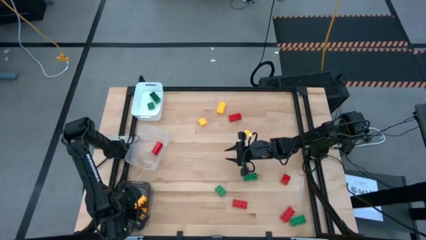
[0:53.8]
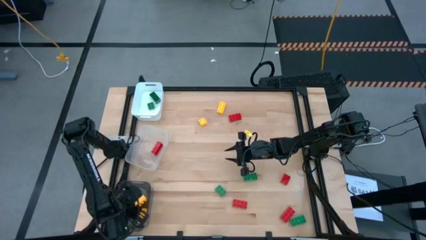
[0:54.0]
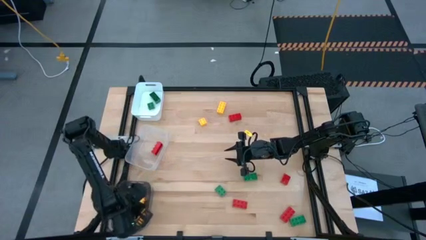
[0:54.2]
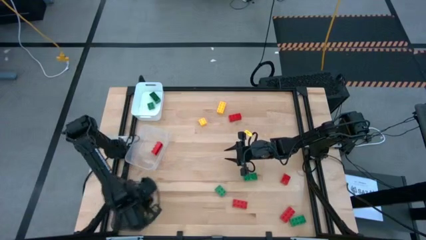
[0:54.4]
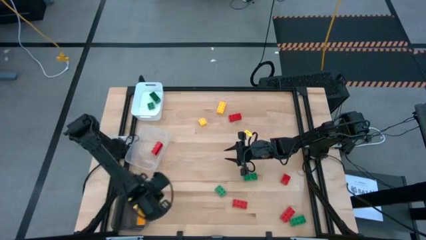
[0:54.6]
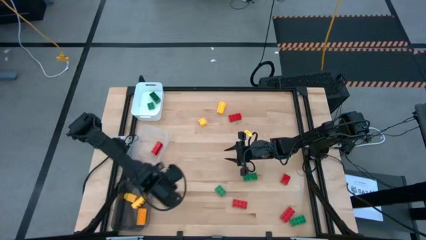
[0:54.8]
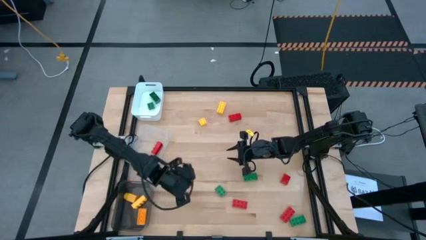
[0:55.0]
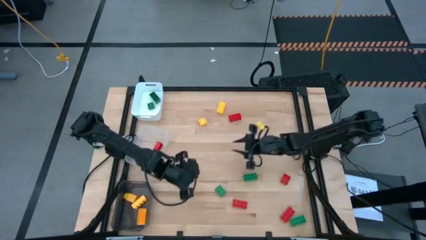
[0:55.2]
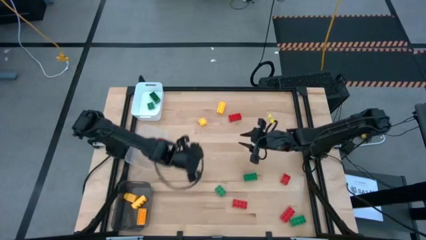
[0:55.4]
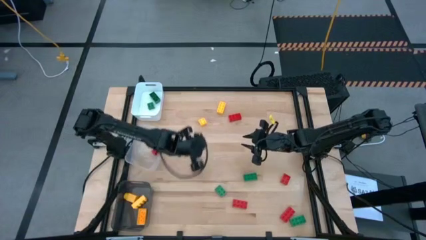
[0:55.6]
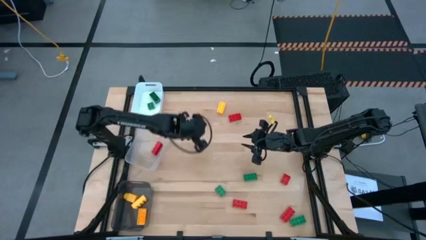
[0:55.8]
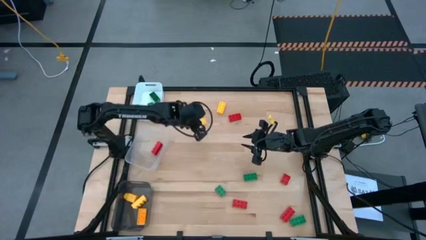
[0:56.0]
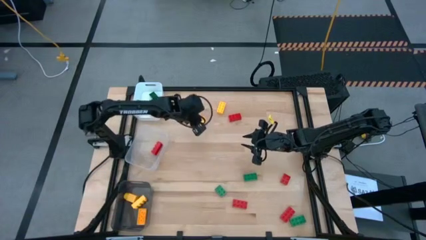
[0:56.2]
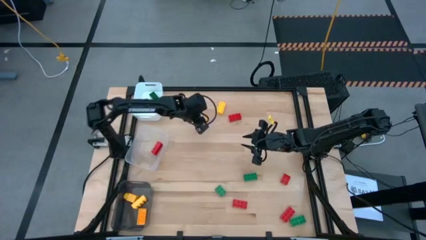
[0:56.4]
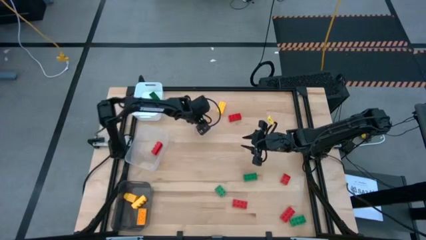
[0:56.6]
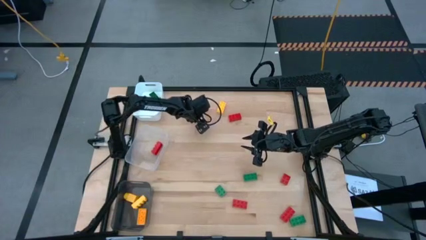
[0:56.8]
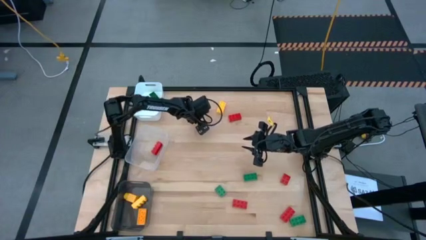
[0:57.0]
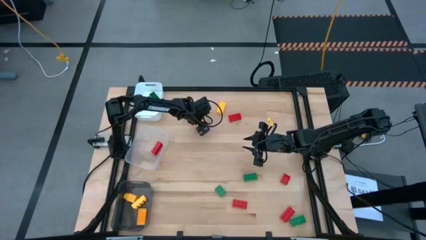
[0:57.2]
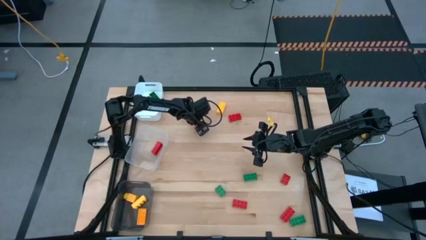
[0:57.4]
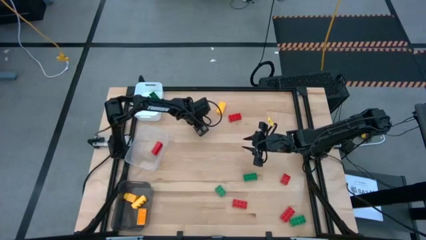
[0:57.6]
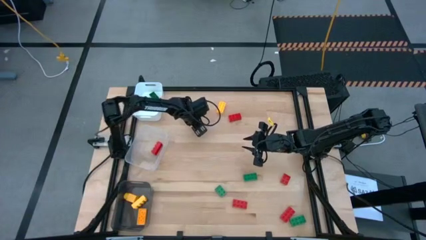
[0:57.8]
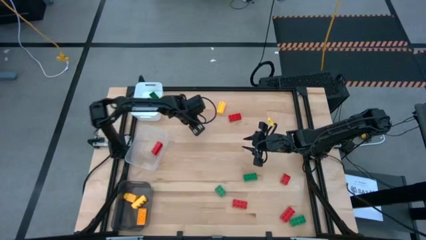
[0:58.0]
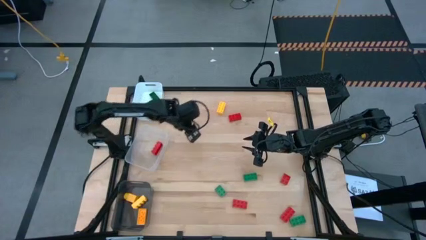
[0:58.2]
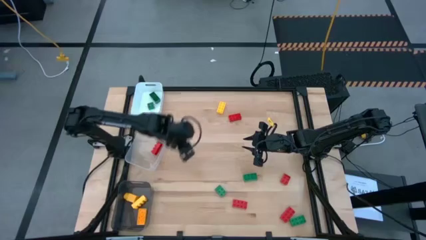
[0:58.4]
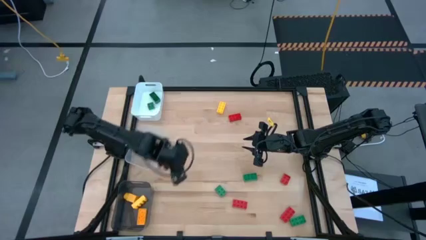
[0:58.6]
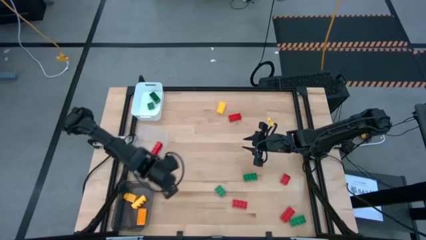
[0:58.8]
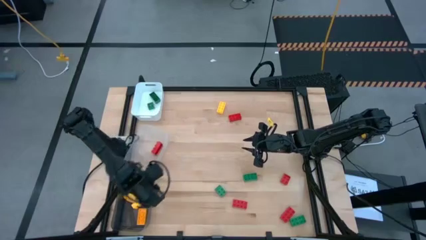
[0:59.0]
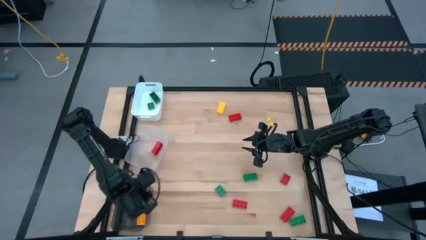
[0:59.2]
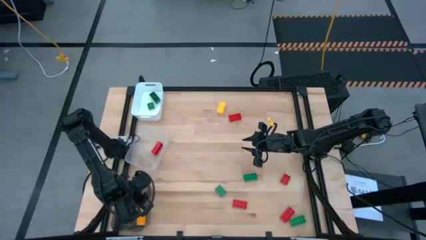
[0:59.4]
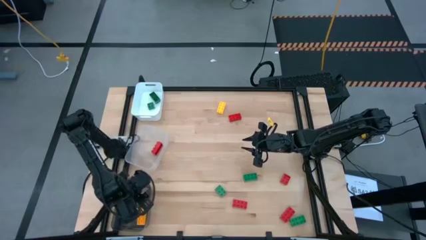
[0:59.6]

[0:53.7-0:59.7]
Task: Sort & place blocks by color
Put the bottom yellow game piece into the black bin

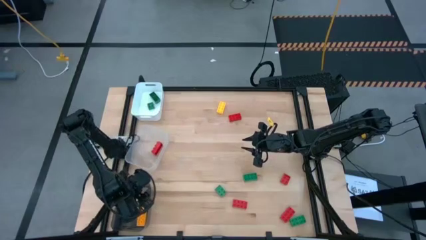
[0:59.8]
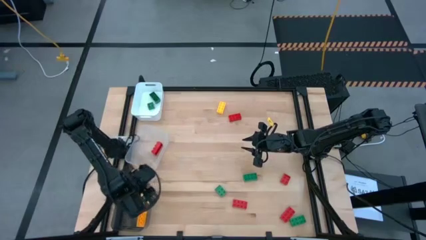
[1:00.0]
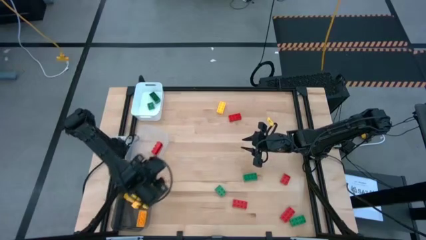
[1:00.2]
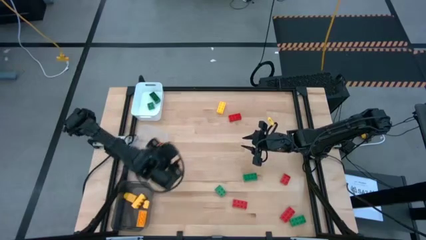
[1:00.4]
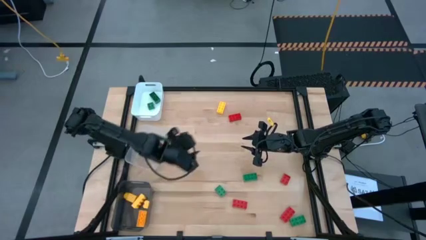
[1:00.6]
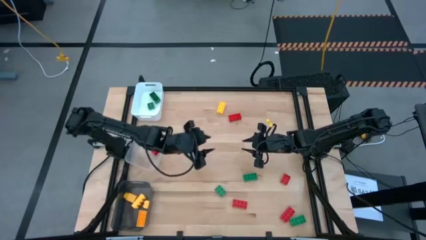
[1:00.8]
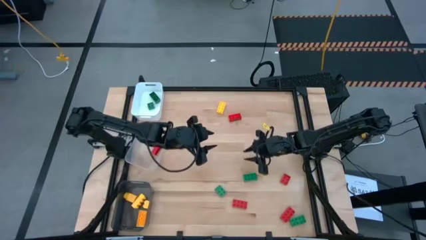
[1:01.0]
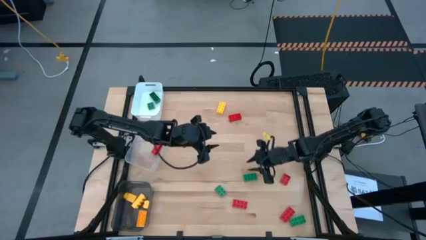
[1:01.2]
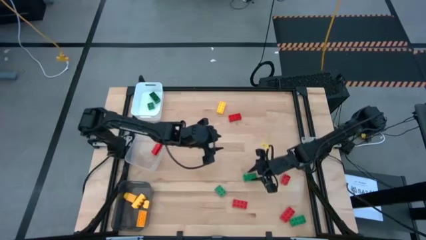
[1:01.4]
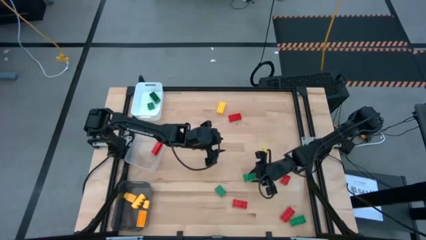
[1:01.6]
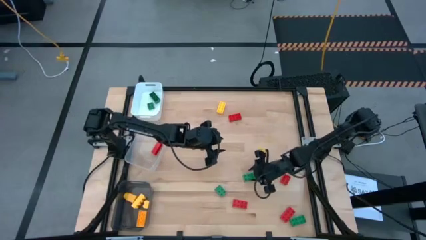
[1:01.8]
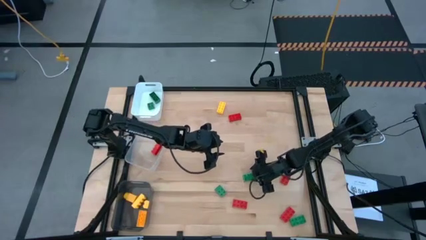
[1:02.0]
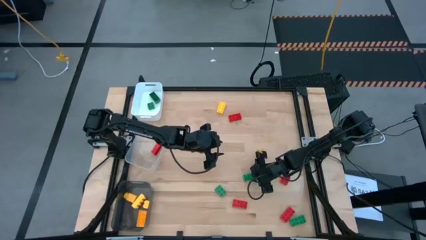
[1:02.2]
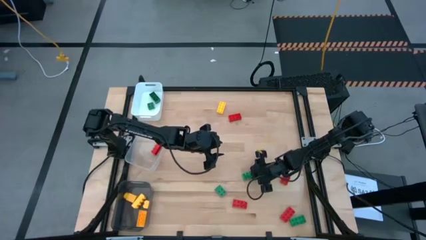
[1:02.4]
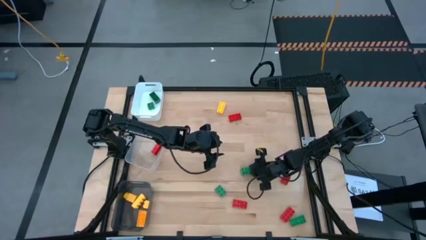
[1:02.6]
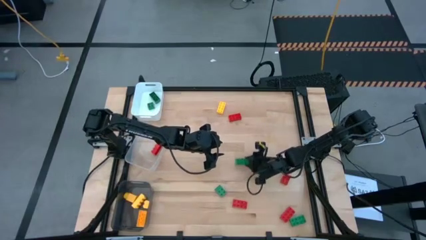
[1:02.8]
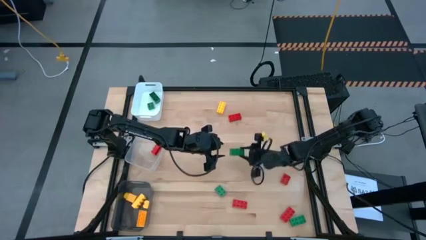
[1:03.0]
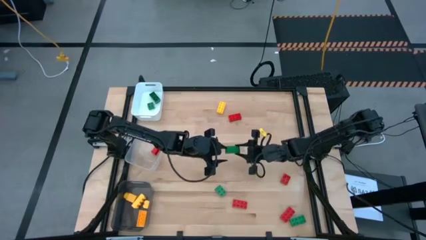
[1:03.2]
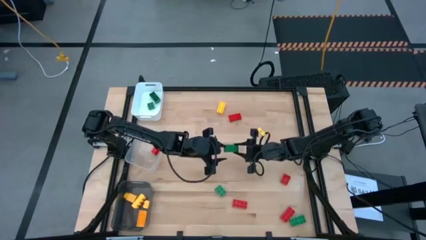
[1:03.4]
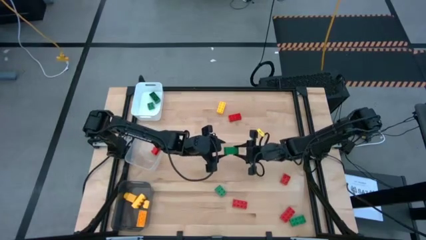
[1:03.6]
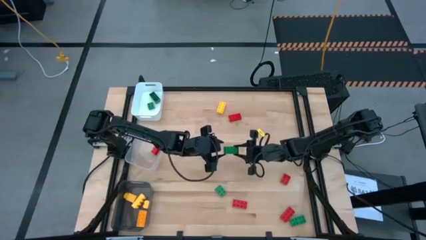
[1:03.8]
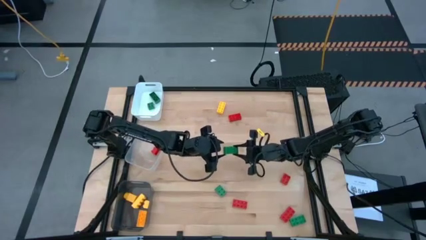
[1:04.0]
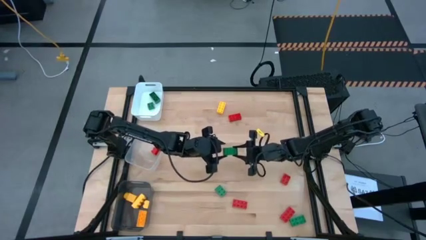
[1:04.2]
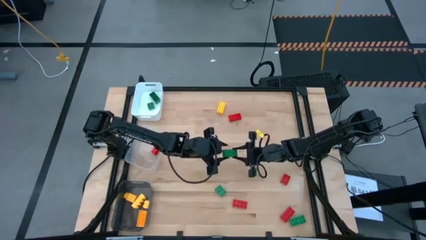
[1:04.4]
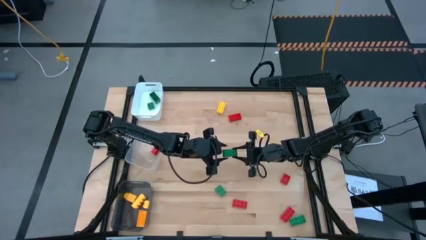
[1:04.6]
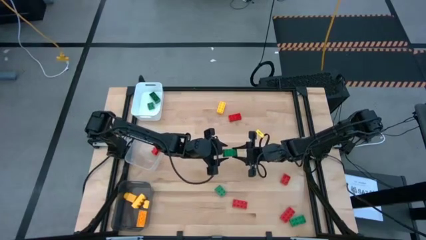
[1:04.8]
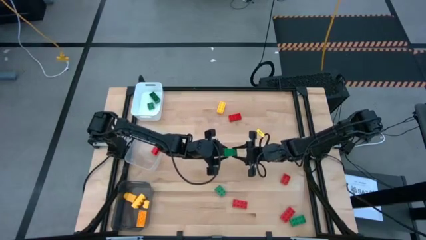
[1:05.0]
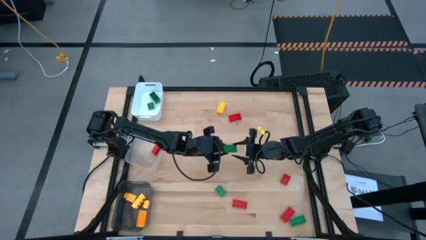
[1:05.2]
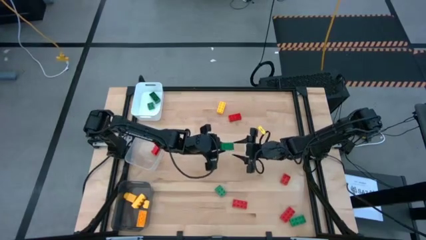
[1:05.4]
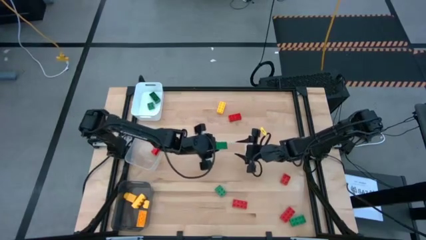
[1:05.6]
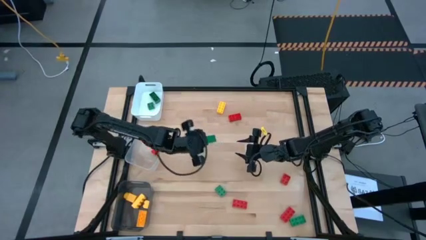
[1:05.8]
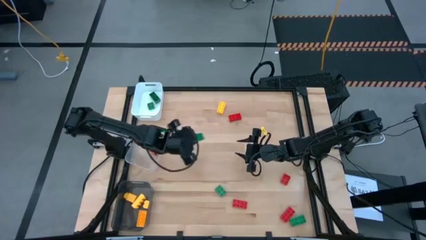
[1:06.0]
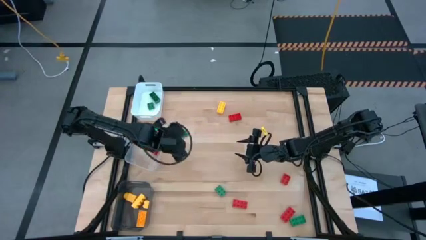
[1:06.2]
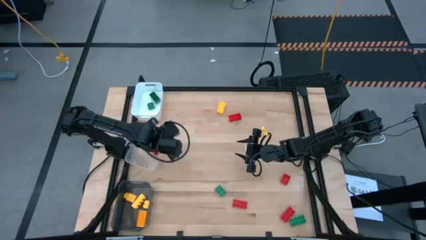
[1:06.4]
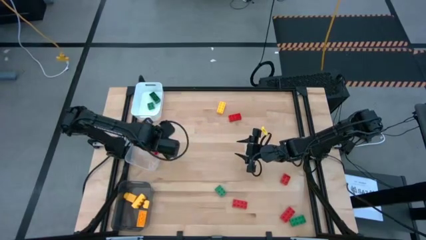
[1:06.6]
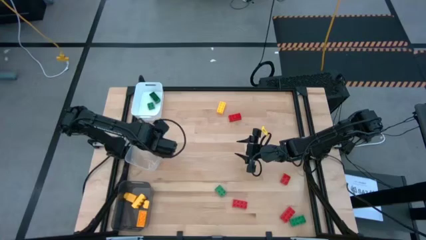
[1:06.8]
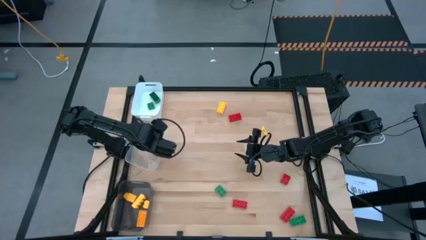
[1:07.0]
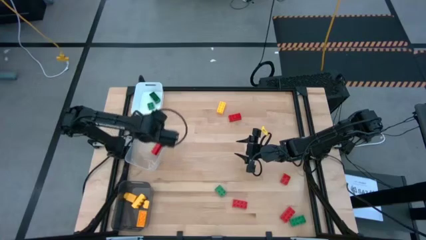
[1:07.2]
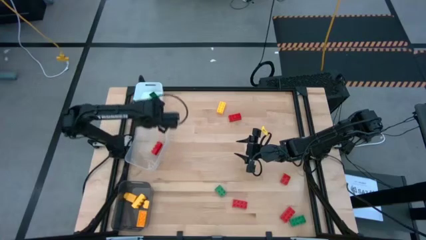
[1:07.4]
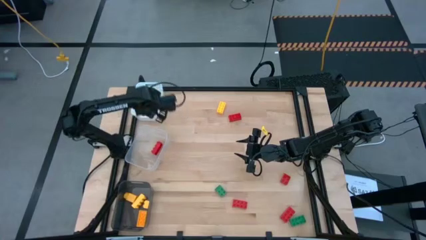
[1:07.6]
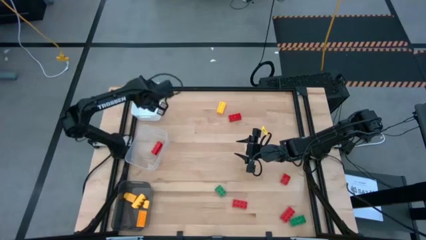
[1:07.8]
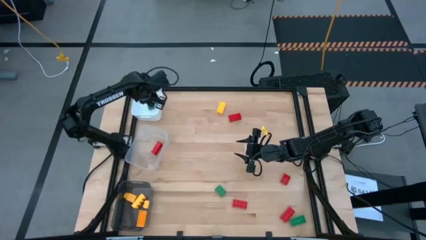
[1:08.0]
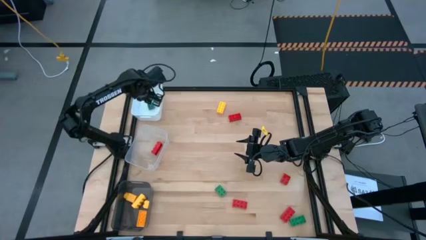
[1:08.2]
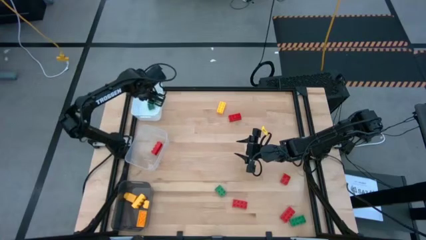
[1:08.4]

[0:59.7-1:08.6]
Put the top green game piece into the white bin

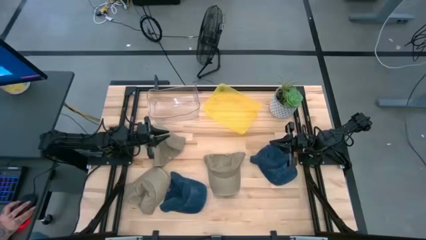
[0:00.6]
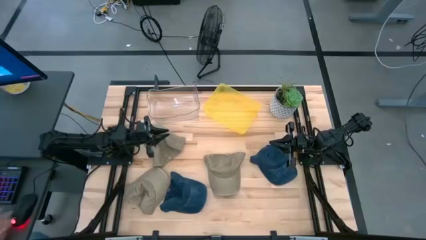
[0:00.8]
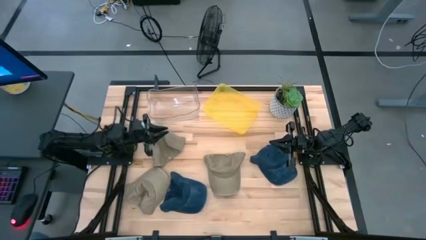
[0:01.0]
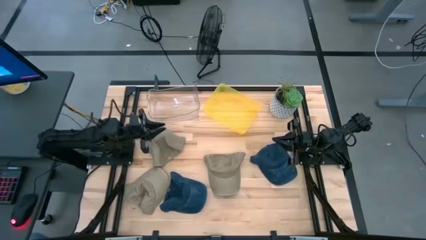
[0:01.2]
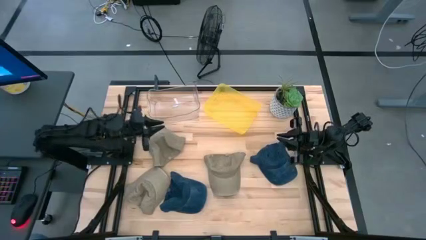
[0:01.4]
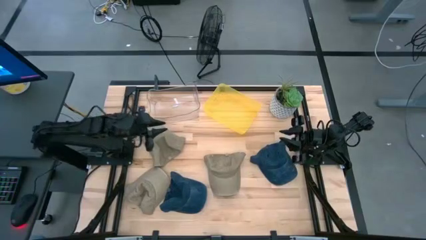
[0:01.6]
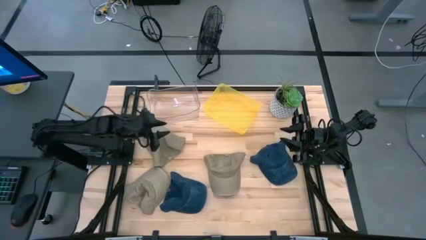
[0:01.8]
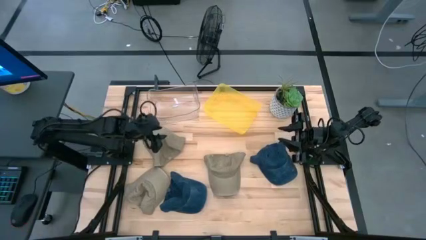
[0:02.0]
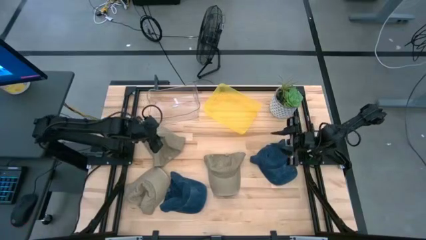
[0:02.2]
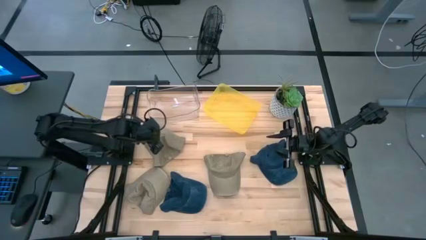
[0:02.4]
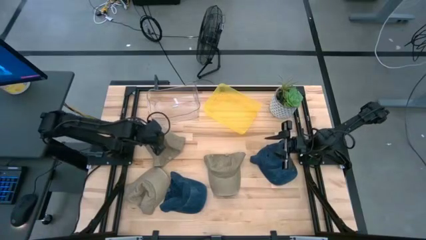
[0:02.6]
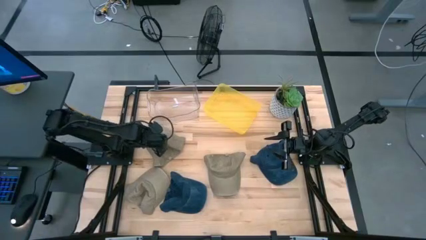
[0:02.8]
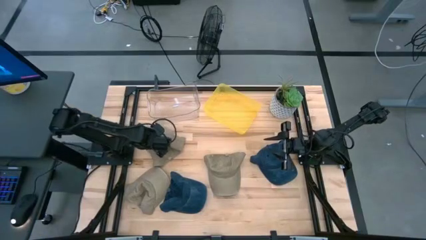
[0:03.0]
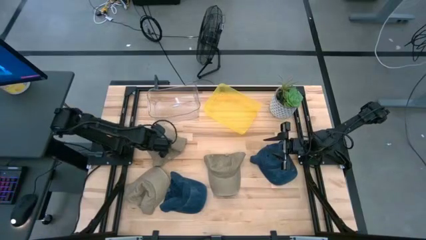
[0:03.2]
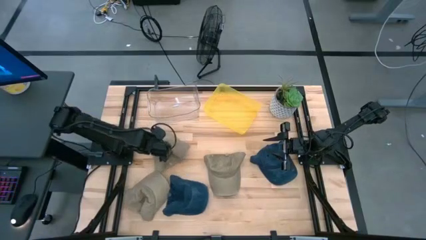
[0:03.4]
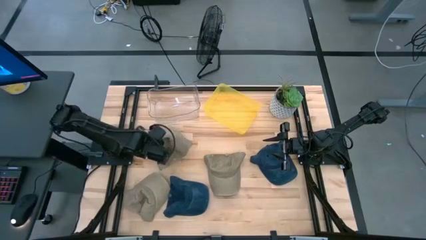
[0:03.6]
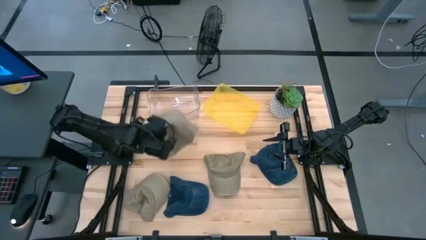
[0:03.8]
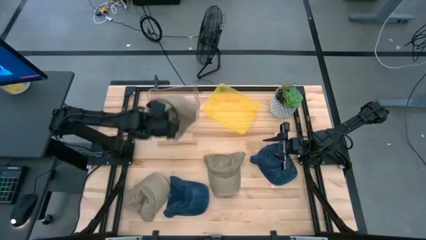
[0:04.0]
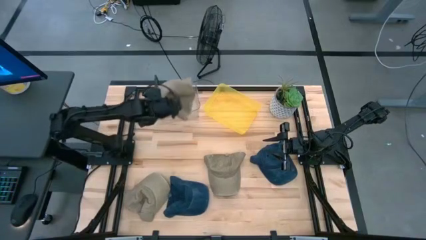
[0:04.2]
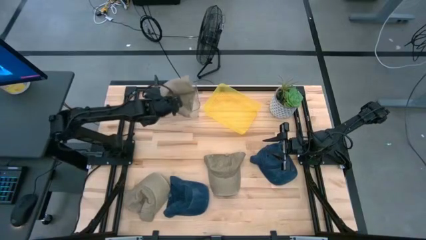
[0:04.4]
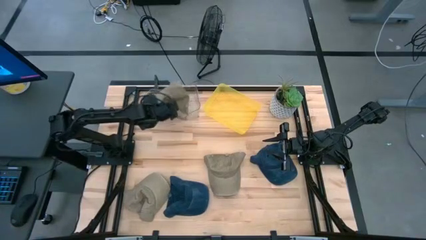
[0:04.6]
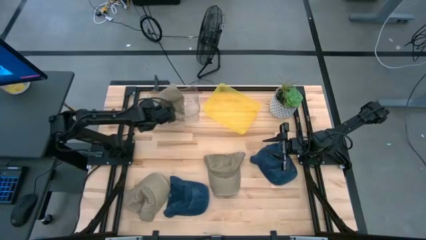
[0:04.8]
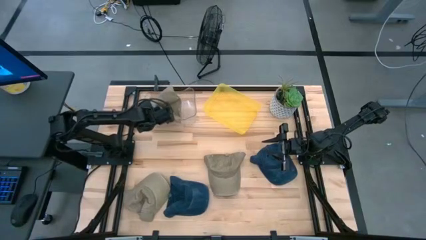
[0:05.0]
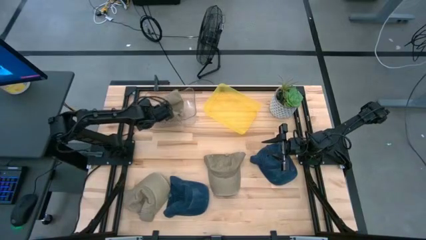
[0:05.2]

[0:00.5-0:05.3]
Task: Pick & Place hat
Put the top brown cap into the transparent bin
